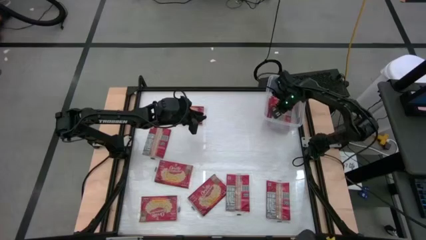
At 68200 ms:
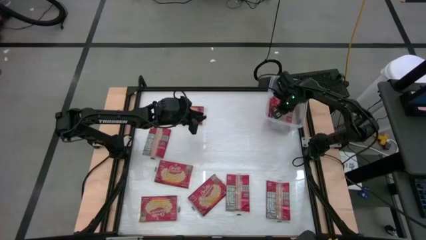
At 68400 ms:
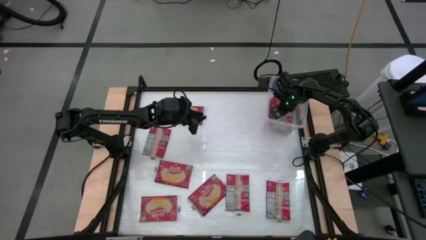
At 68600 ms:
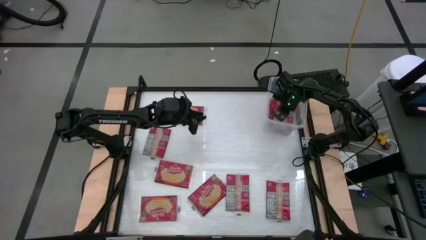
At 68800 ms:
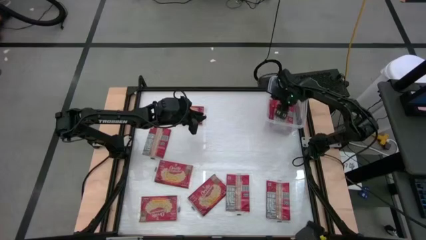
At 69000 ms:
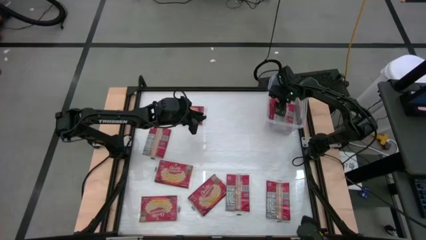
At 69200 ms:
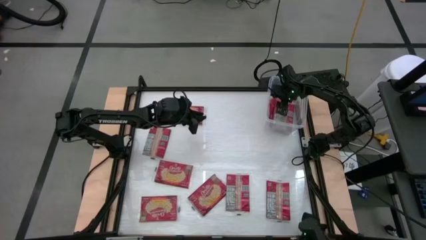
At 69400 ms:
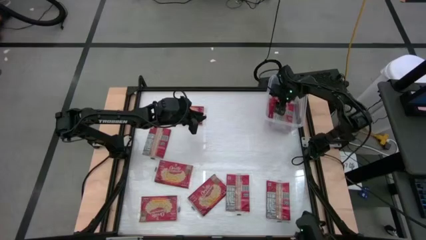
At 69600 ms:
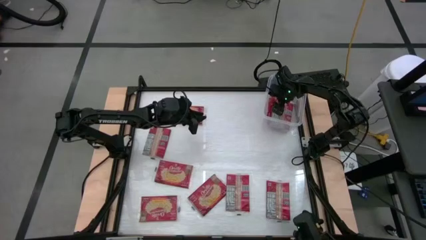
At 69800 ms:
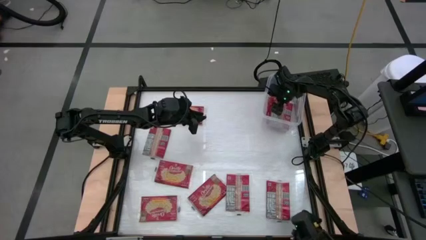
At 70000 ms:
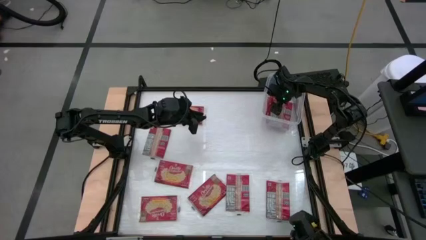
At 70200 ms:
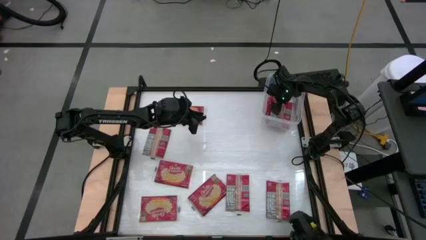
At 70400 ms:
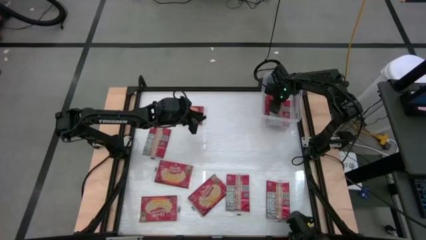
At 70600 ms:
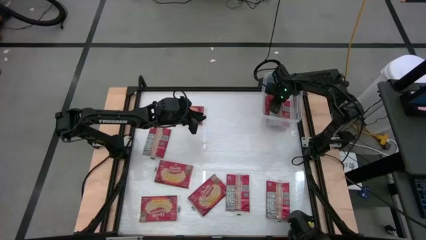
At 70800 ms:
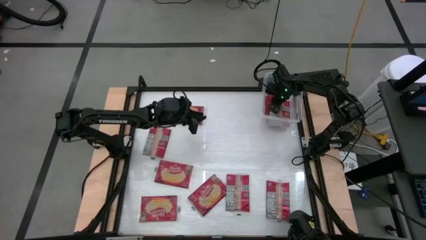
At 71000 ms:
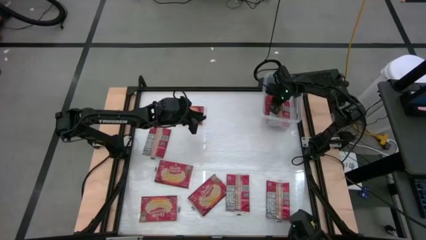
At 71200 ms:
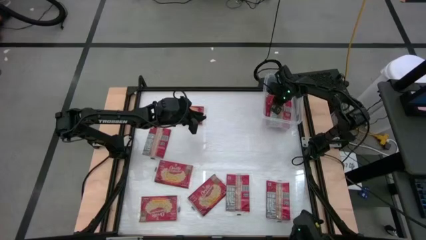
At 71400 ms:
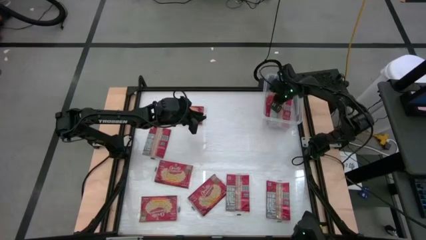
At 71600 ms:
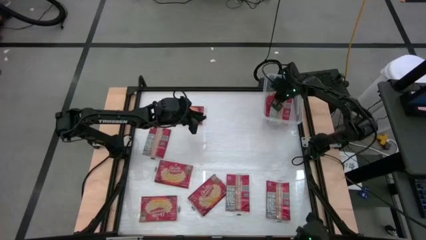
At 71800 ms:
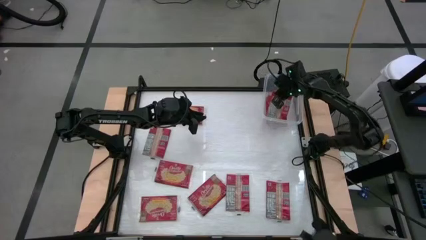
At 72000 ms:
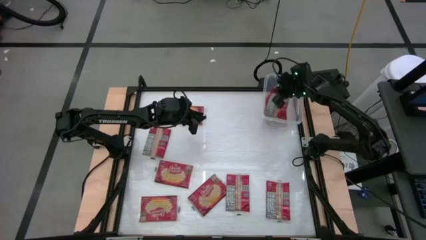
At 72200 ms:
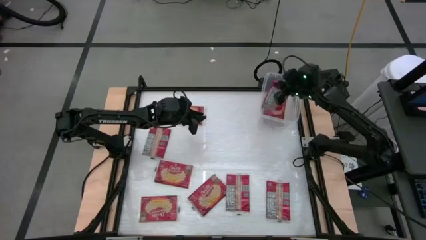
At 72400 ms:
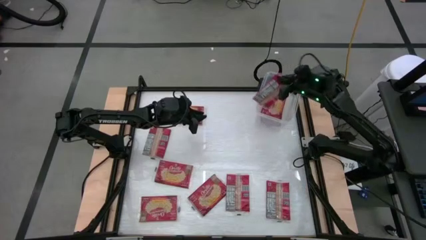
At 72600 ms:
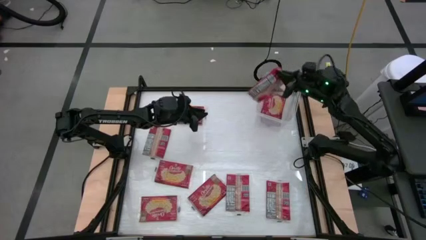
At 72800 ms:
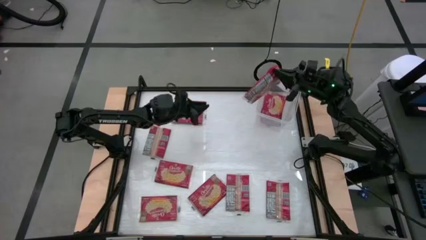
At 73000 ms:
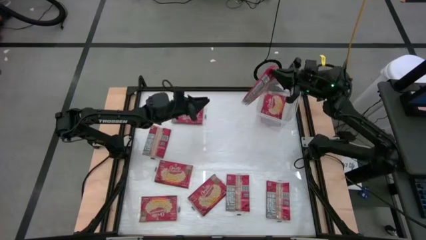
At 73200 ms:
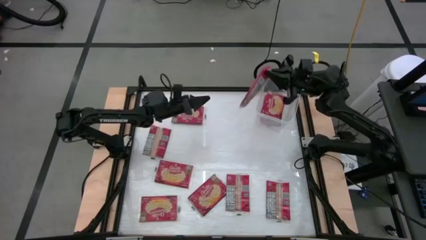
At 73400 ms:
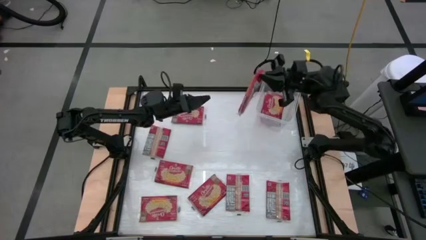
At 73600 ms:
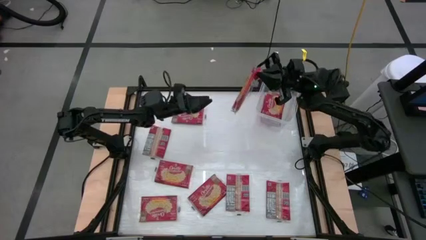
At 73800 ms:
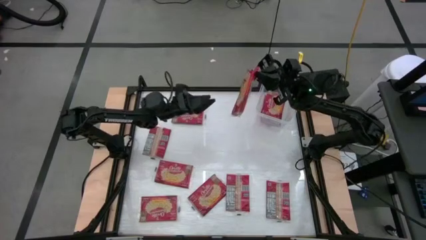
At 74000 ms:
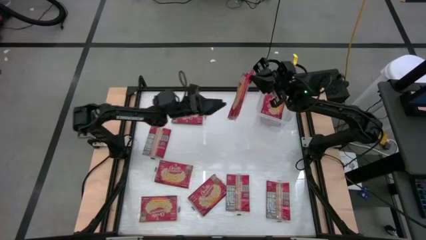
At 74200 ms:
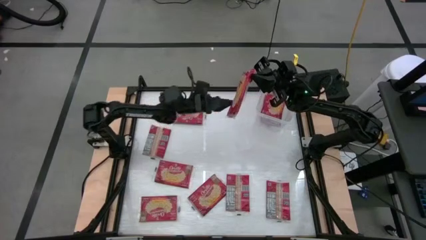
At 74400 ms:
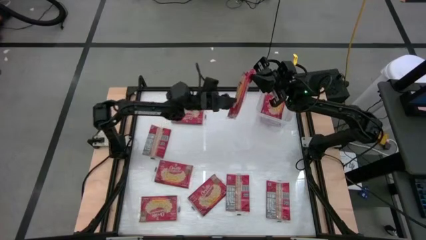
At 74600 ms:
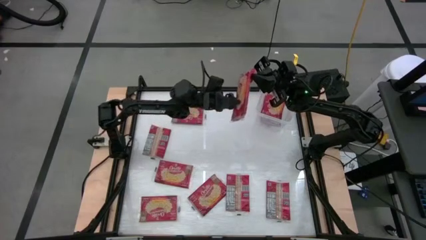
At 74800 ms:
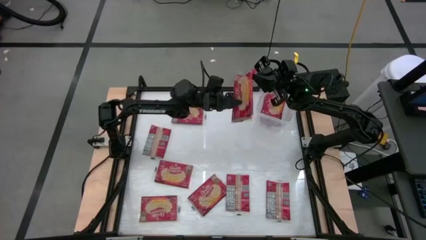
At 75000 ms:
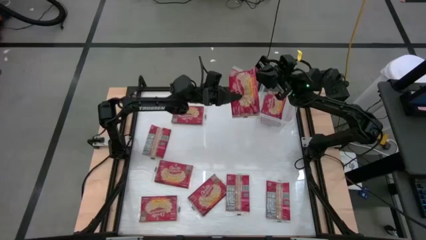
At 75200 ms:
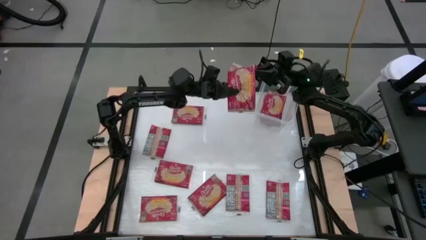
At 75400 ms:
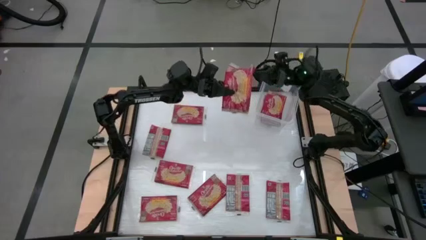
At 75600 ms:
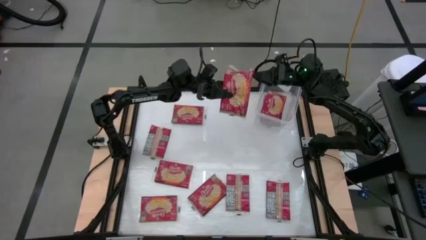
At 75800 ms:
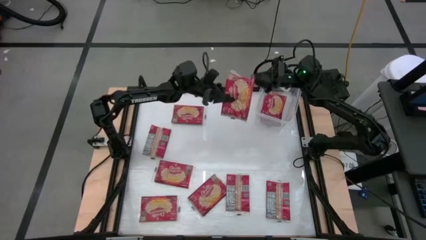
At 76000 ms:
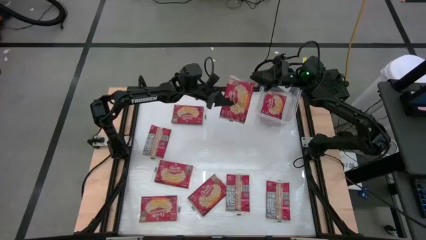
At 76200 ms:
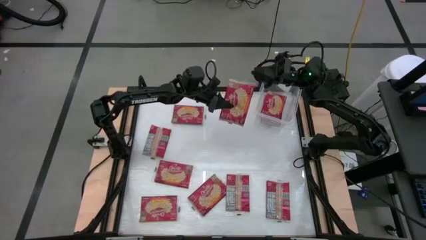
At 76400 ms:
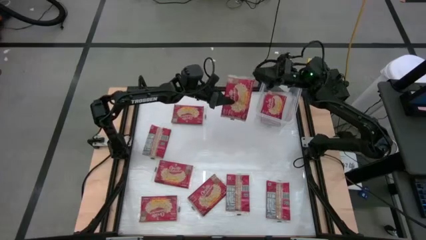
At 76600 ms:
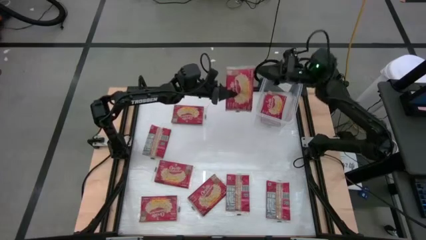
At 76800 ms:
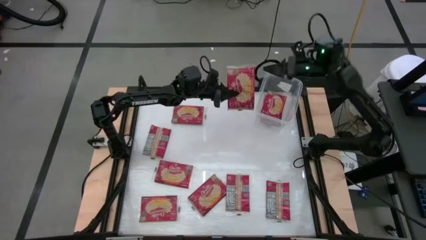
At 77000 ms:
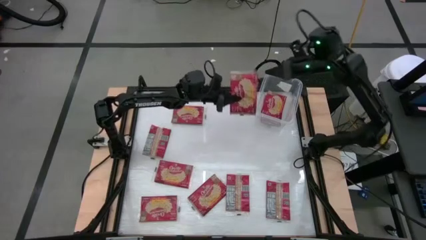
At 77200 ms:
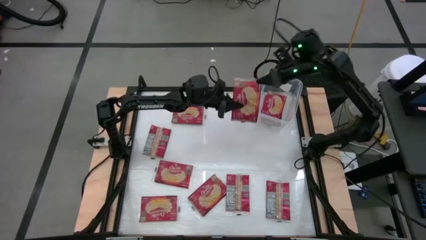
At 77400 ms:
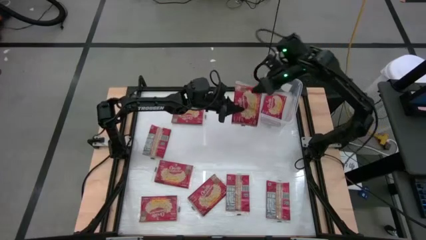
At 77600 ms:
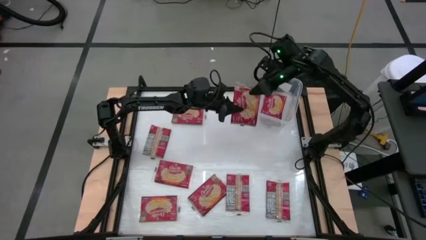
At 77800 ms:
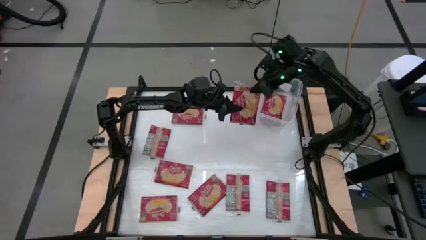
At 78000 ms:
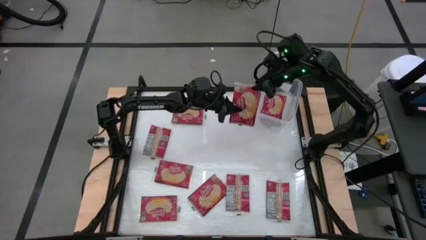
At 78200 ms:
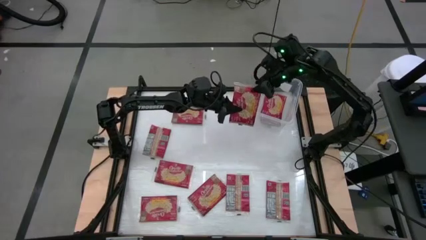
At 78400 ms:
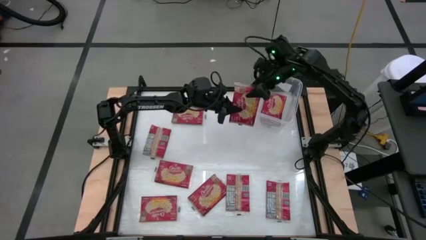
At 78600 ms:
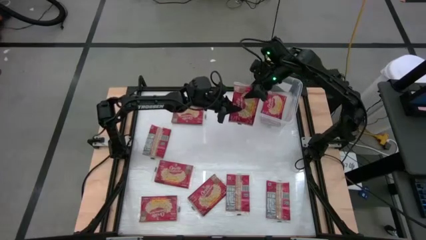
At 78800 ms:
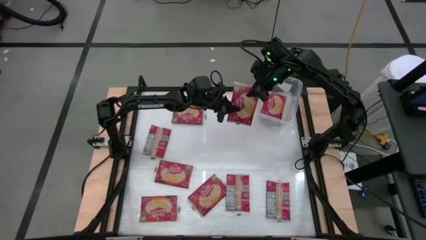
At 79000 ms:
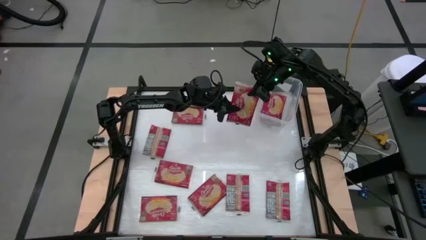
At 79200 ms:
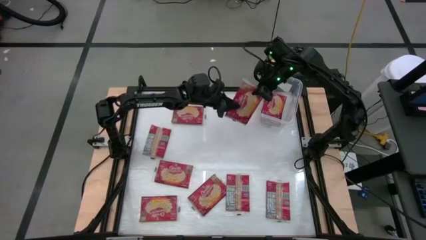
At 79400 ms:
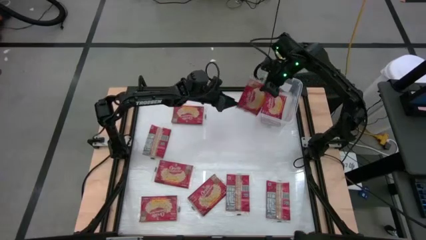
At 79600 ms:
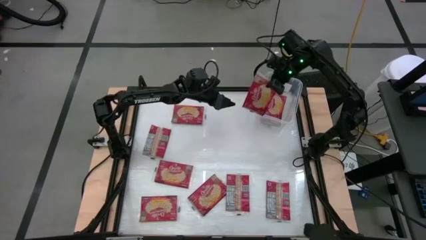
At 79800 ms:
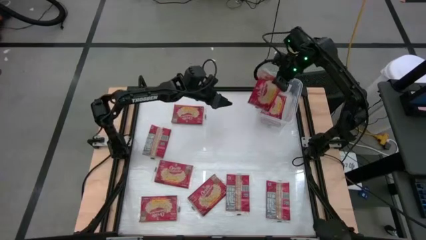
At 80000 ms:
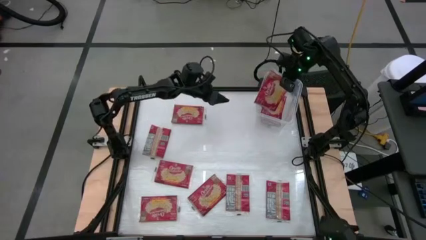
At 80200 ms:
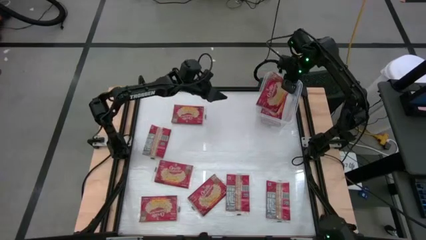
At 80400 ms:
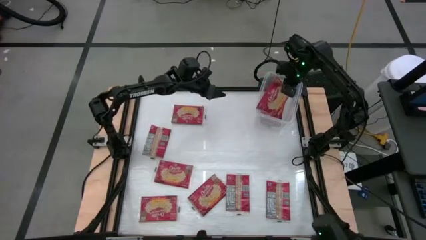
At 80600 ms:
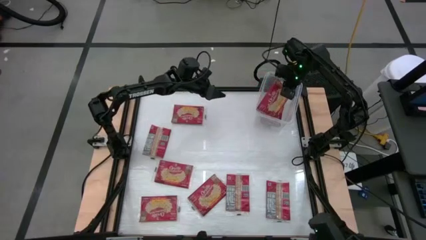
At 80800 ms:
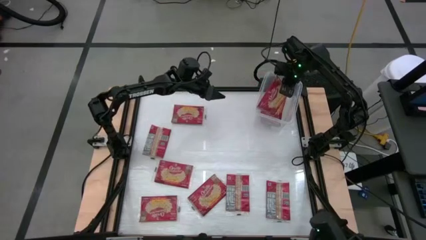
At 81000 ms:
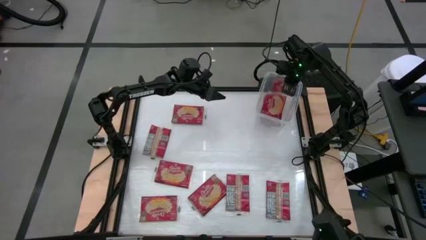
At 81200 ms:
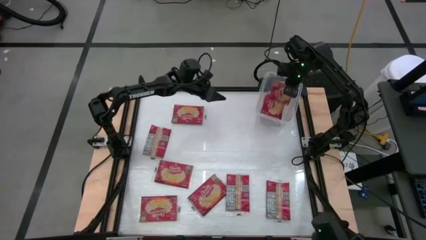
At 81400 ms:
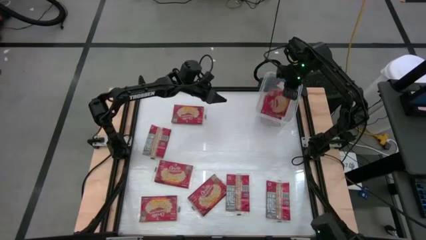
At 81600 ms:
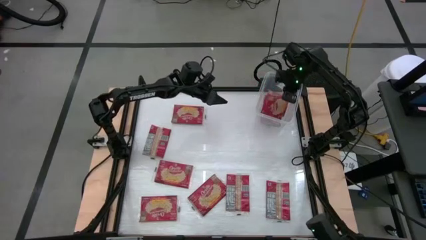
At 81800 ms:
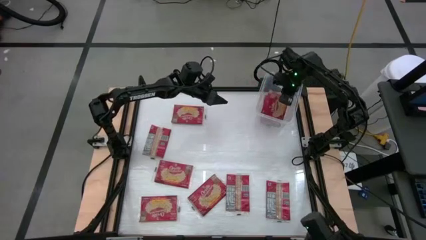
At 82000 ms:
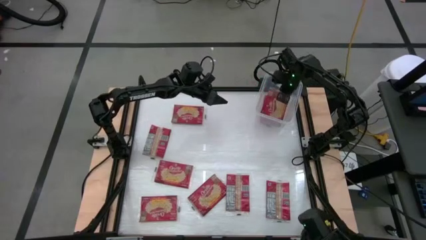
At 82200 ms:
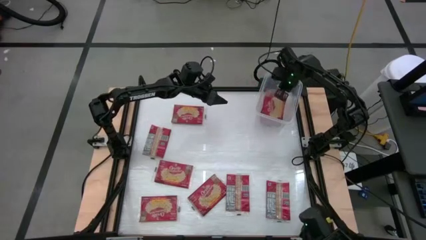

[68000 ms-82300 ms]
Task: Sort popcorn bags into baskets
Put the red popcorn bag into the transparent container

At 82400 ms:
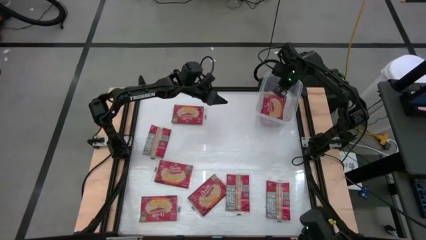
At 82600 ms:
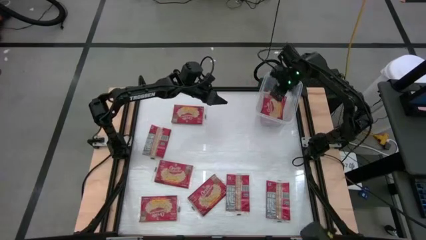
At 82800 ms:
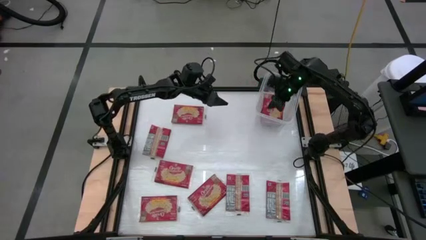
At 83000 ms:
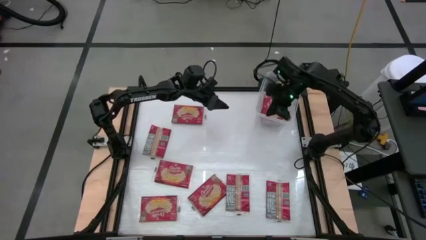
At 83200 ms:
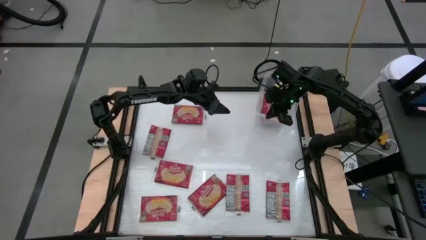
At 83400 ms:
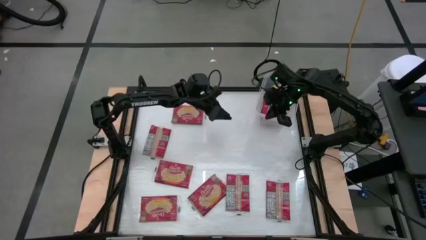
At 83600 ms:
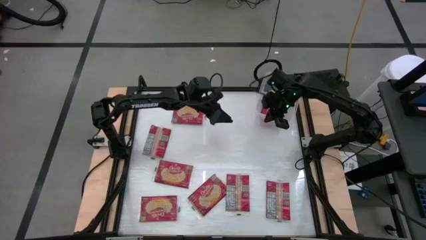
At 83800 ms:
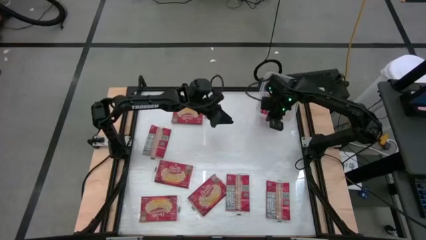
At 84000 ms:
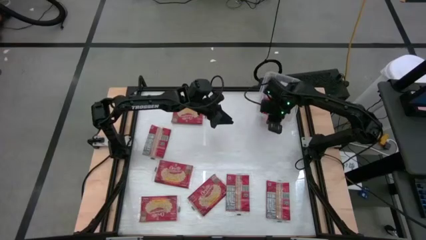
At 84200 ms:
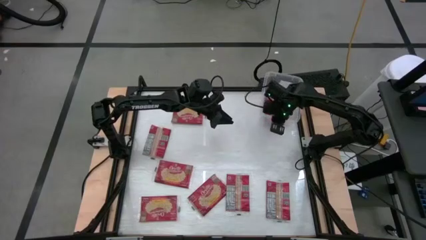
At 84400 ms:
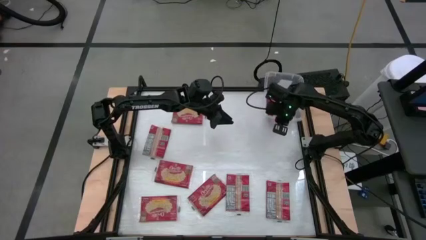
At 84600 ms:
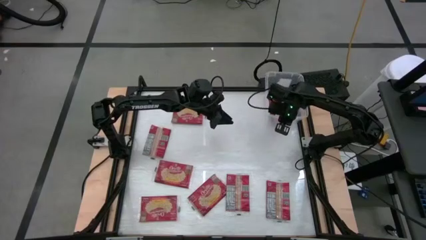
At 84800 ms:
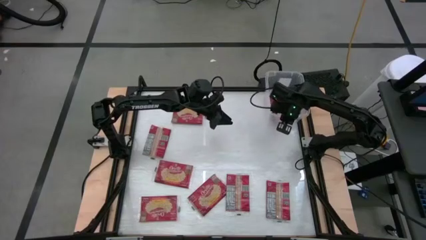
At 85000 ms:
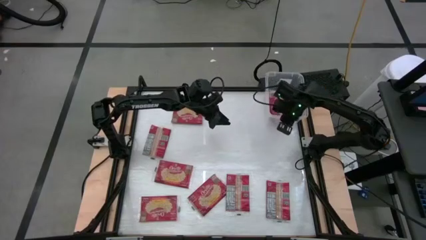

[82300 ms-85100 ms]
Adjust the transparent container on the table
